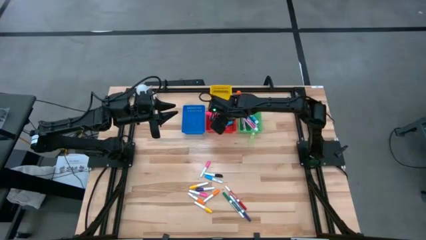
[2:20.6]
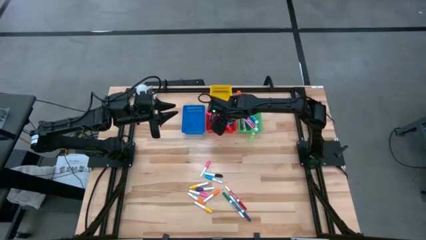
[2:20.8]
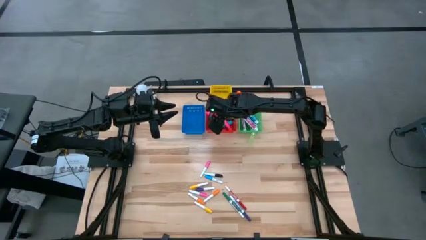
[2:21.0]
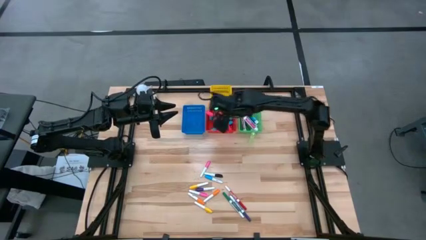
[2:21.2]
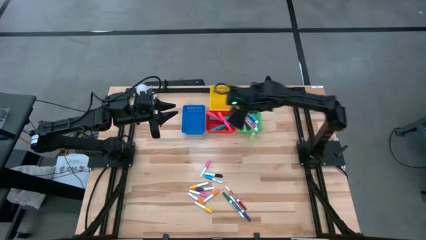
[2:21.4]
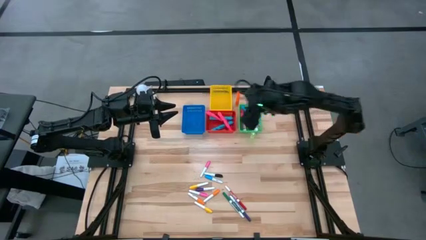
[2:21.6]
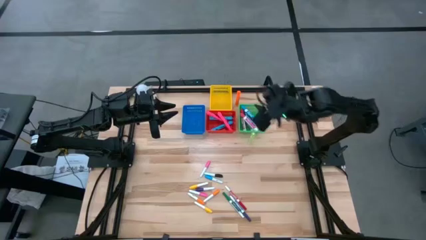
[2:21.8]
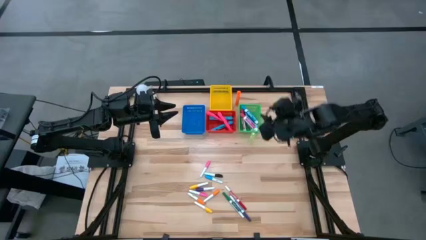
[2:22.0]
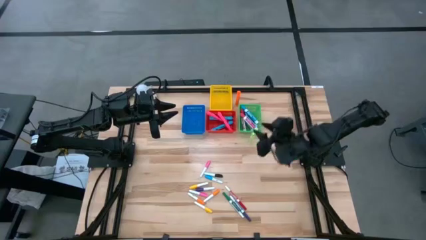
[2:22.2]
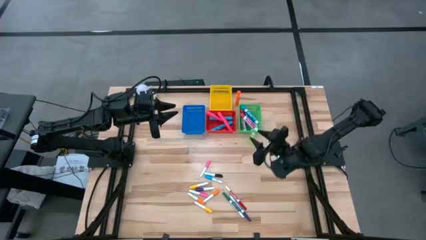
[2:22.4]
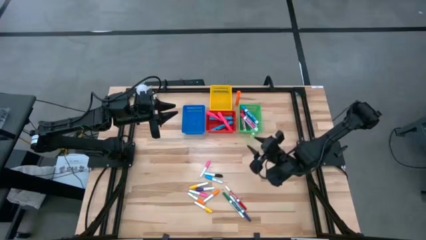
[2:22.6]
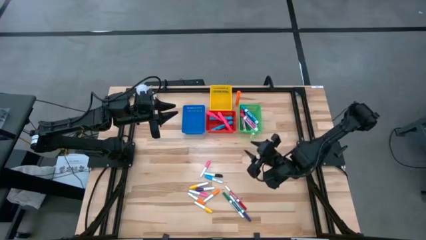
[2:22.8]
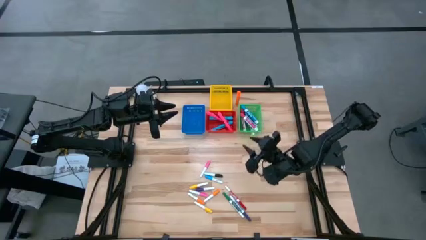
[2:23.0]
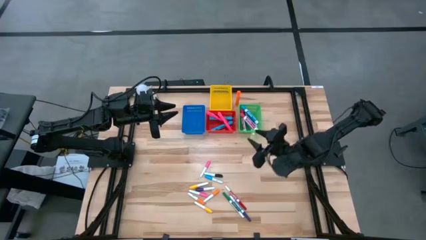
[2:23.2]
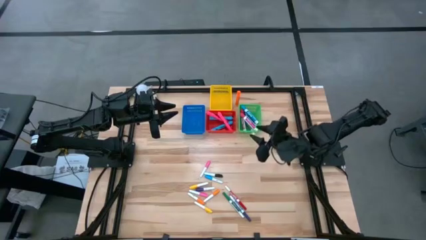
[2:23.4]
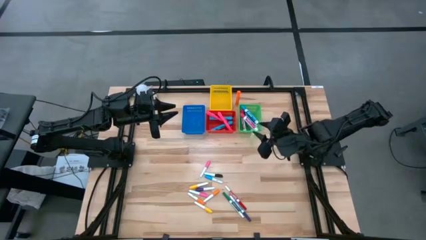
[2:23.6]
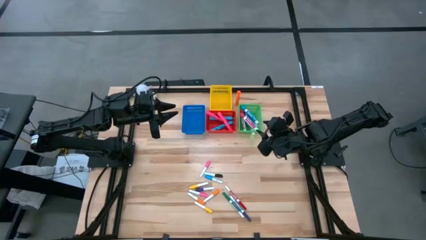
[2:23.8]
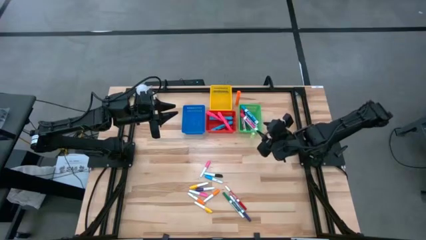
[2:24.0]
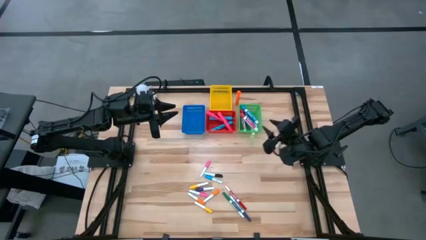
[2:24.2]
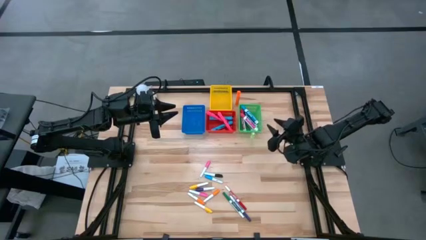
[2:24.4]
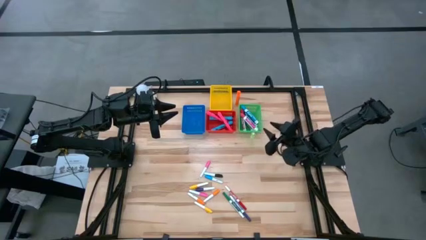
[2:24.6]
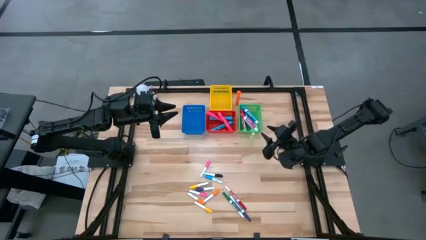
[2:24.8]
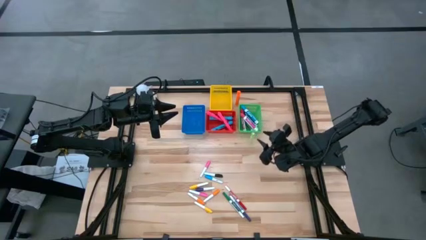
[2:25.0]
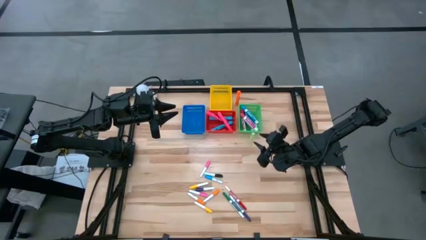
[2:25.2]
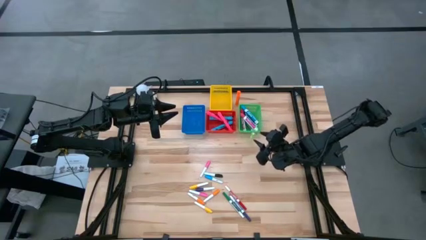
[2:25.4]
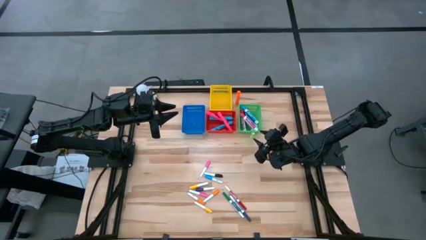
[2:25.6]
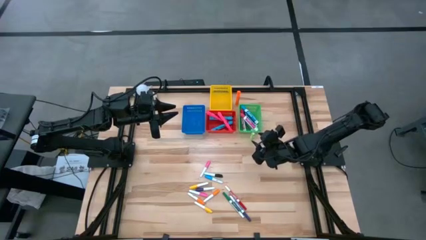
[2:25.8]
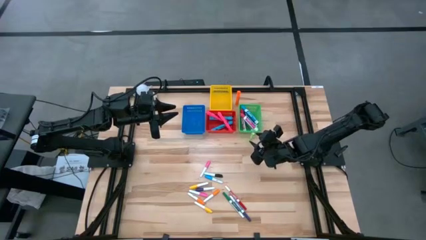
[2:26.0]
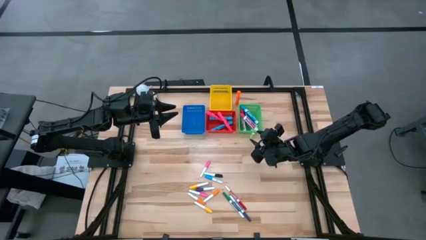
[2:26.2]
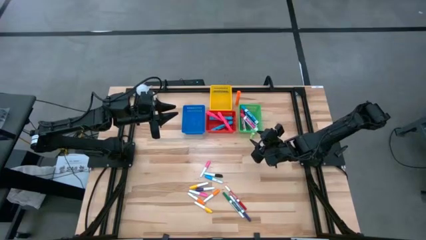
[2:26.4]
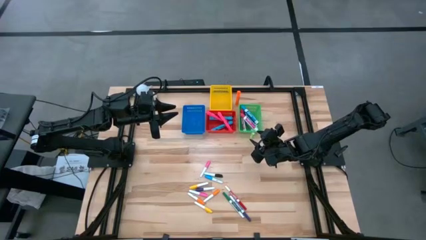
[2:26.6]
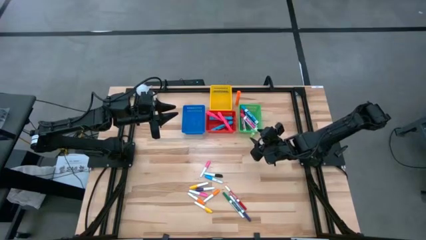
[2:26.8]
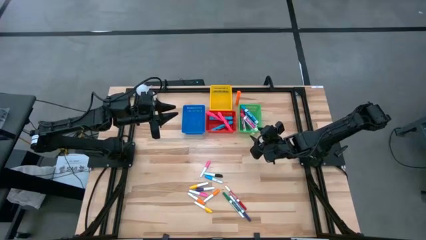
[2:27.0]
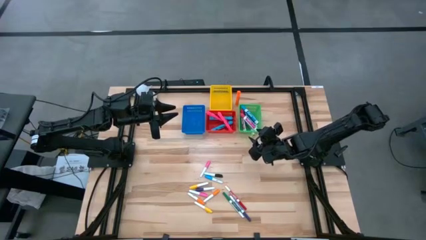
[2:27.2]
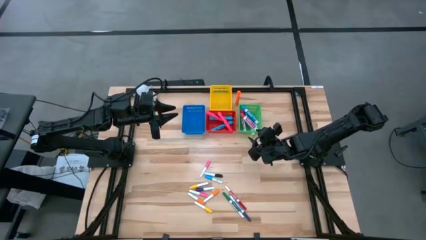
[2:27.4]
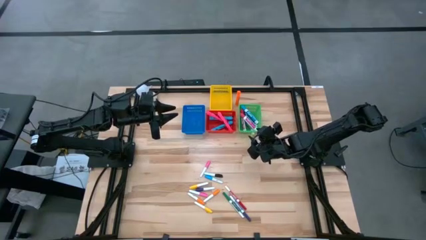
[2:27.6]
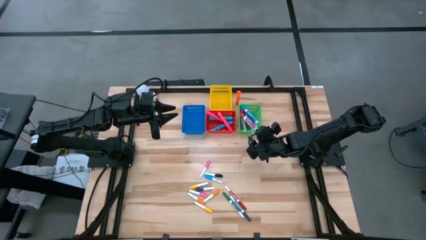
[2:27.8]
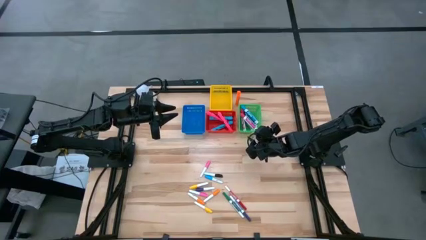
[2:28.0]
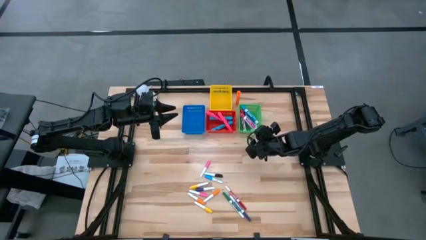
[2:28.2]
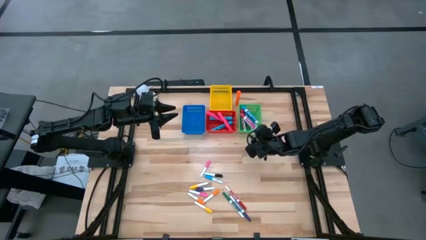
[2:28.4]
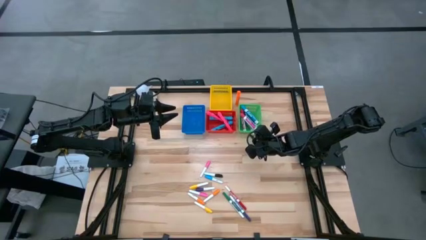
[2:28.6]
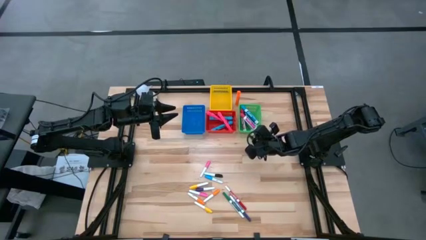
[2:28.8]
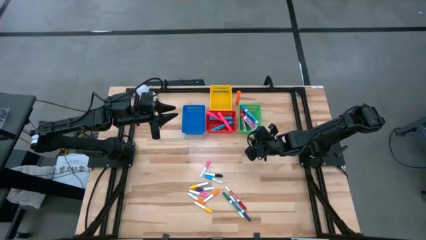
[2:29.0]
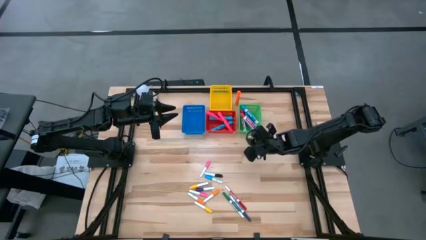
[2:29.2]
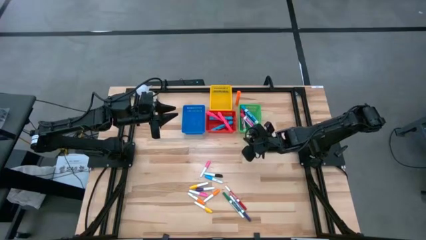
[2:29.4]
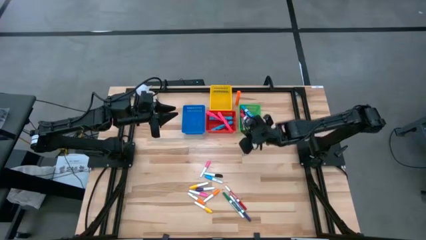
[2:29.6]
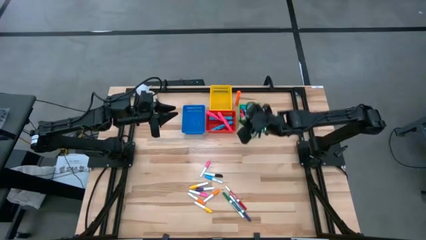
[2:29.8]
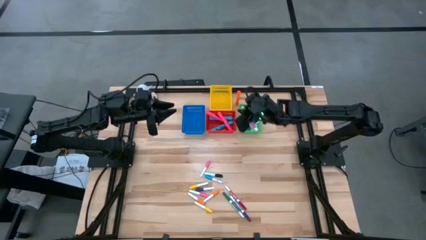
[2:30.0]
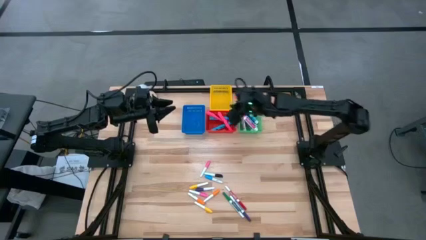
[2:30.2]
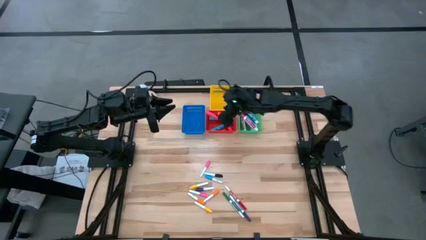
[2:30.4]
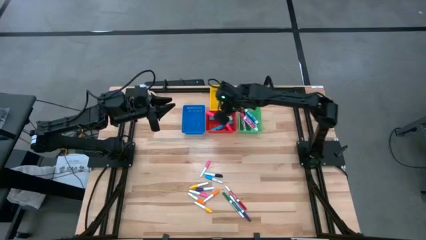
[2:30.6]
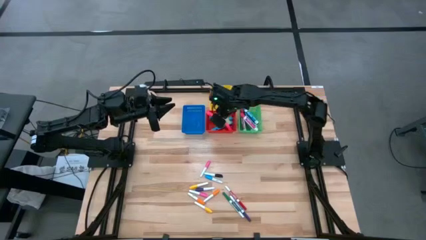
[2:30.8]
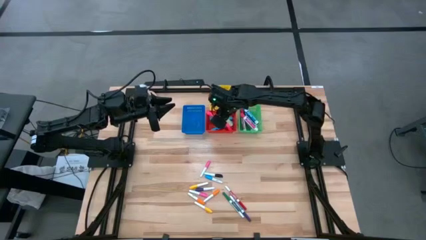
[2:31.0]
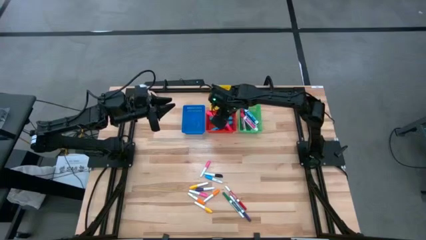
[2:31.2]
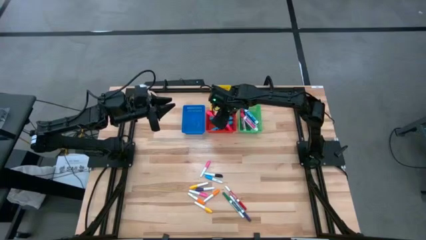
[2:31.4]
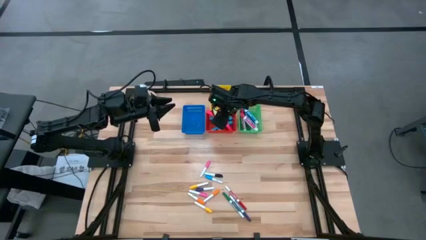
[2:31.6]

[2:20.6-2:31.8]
Task: Pick & Place Markers
Put the light green highlighter pen into the red bin
